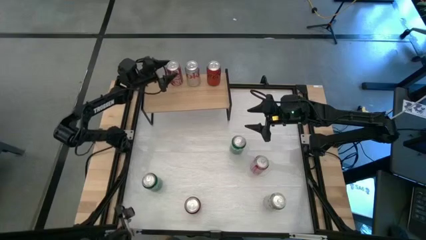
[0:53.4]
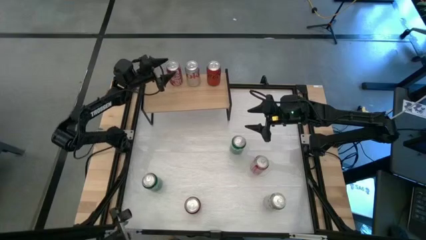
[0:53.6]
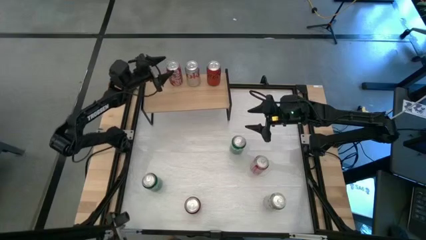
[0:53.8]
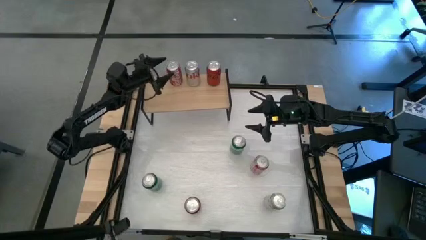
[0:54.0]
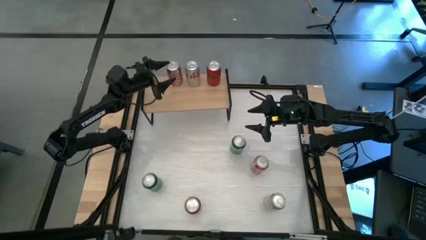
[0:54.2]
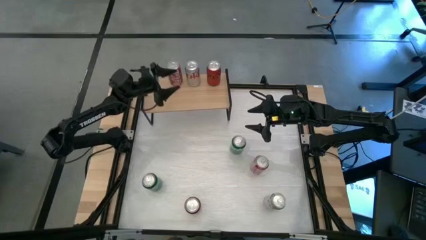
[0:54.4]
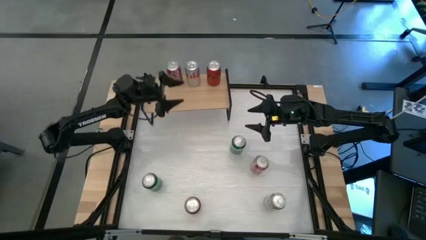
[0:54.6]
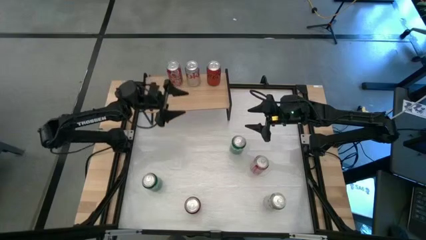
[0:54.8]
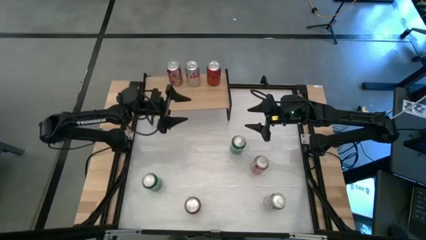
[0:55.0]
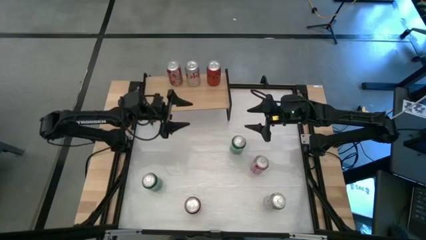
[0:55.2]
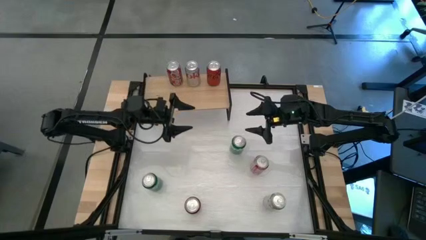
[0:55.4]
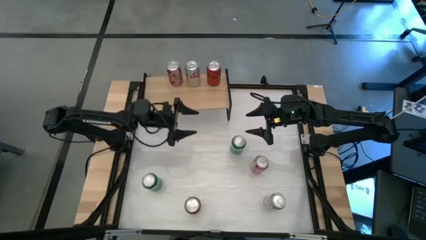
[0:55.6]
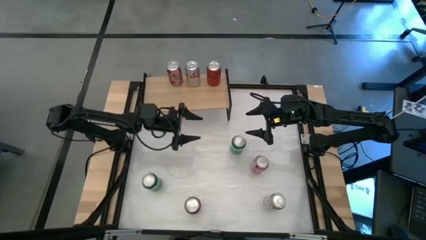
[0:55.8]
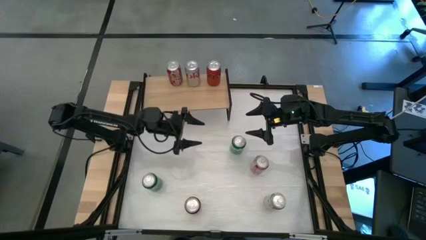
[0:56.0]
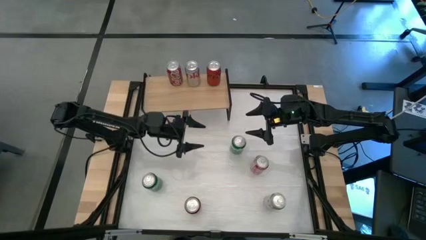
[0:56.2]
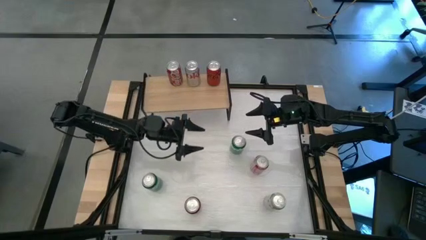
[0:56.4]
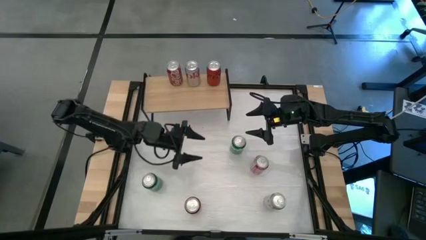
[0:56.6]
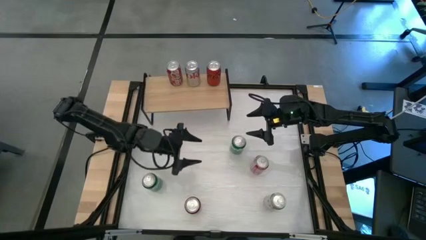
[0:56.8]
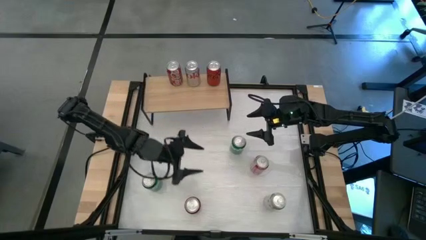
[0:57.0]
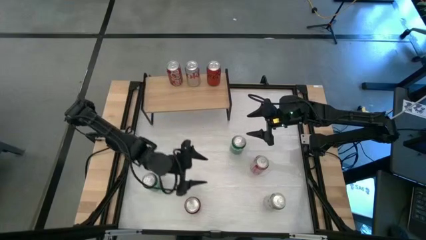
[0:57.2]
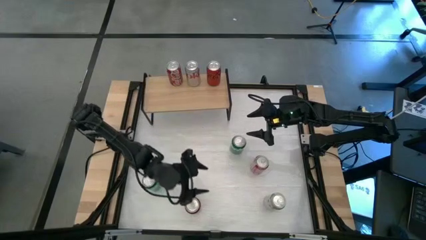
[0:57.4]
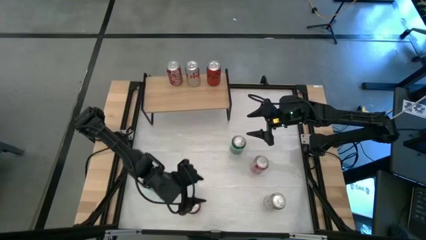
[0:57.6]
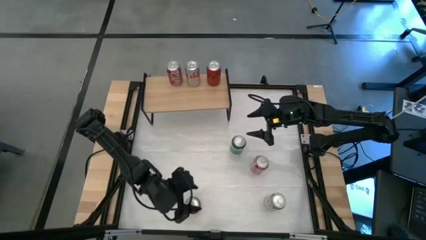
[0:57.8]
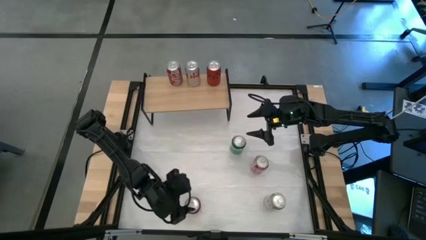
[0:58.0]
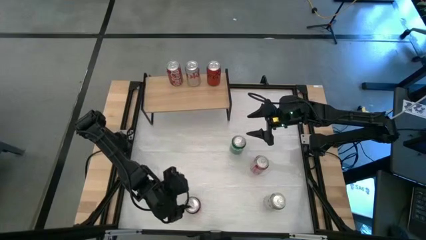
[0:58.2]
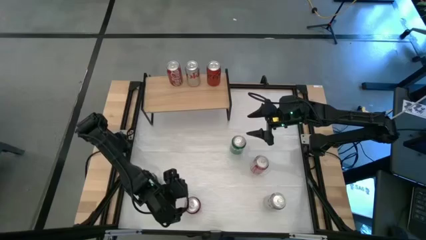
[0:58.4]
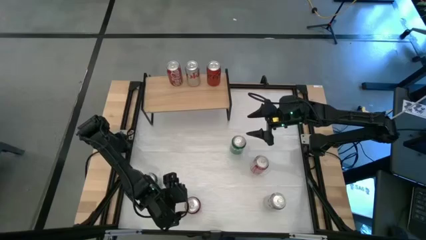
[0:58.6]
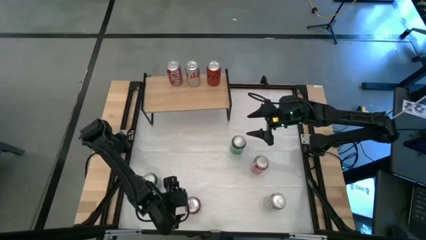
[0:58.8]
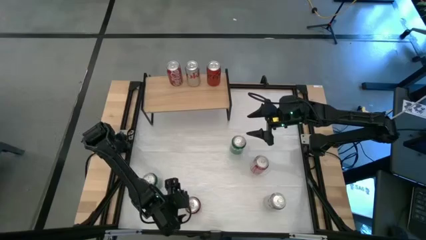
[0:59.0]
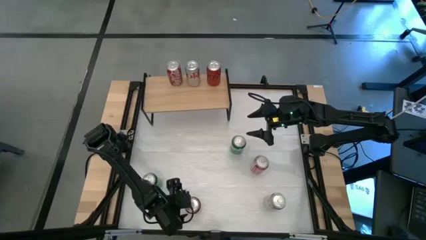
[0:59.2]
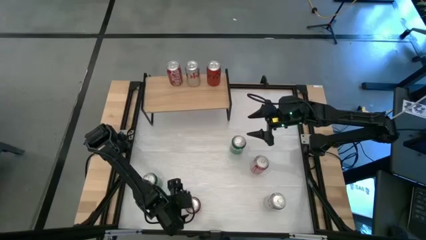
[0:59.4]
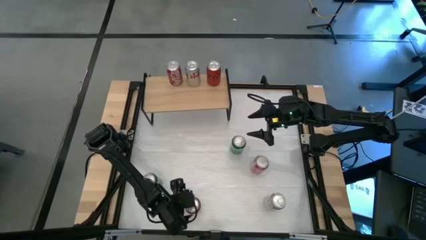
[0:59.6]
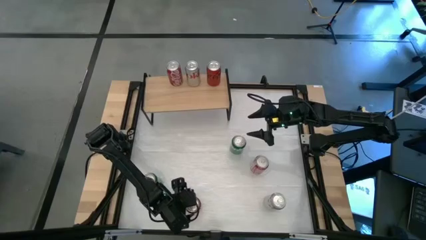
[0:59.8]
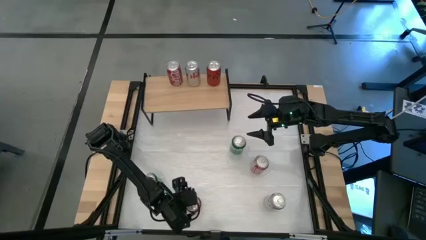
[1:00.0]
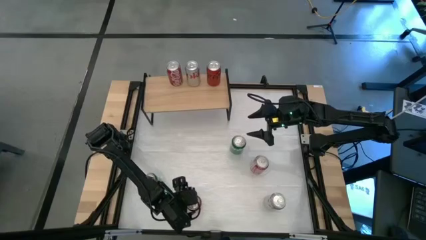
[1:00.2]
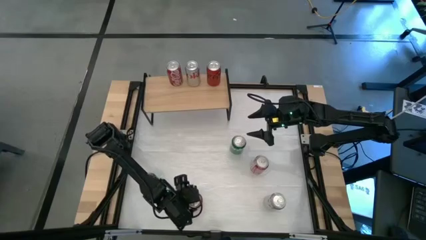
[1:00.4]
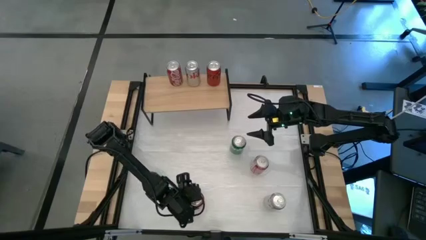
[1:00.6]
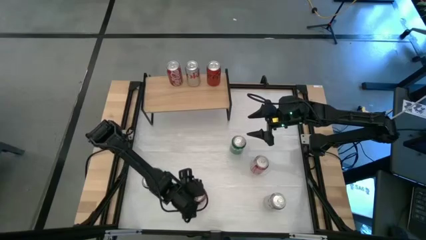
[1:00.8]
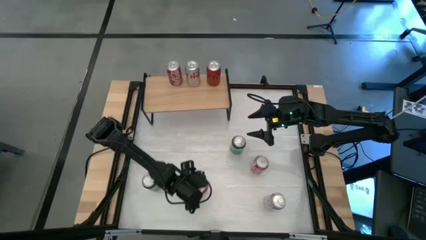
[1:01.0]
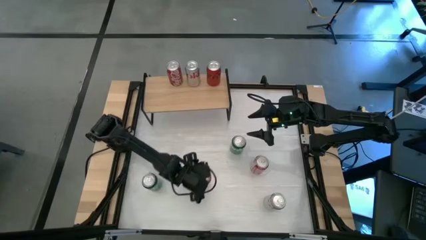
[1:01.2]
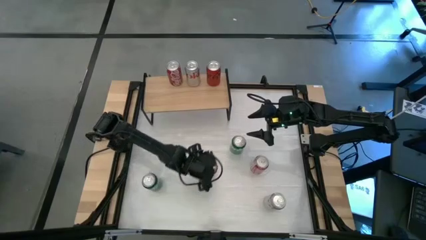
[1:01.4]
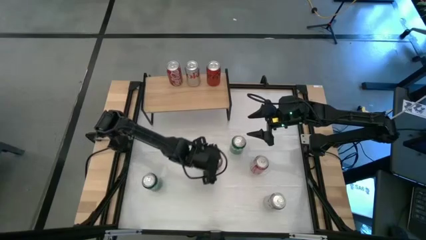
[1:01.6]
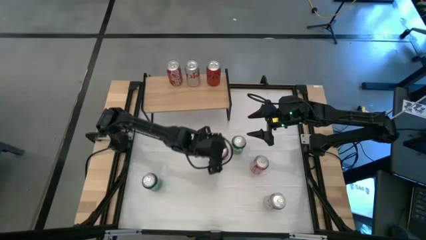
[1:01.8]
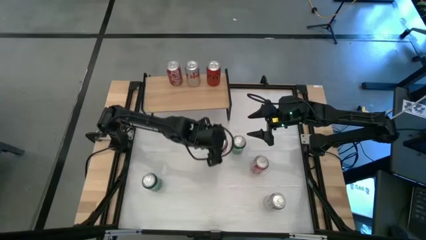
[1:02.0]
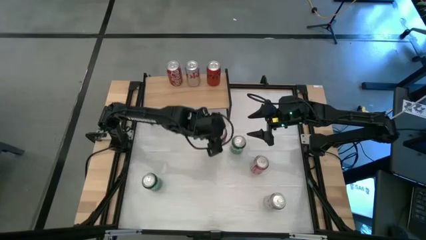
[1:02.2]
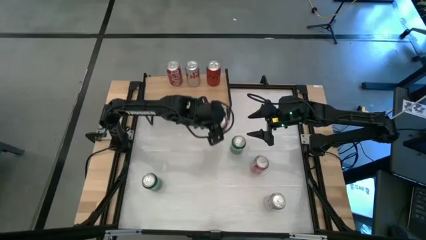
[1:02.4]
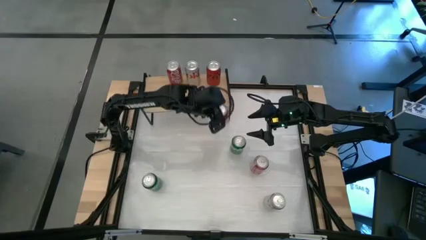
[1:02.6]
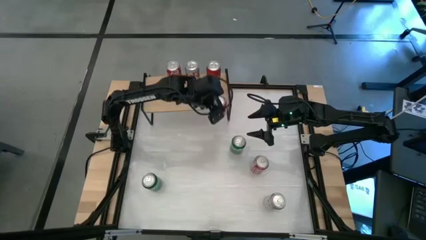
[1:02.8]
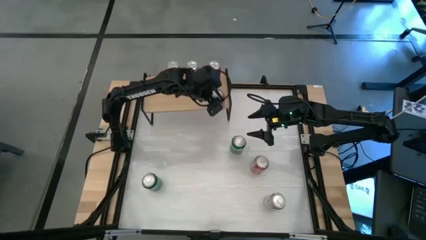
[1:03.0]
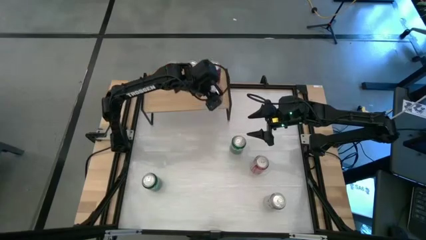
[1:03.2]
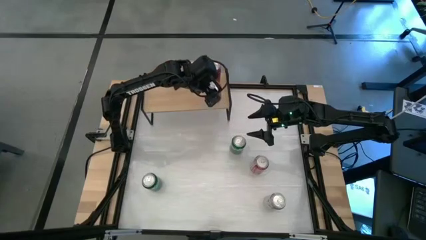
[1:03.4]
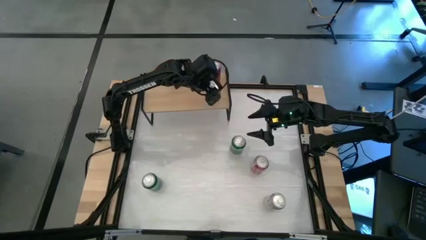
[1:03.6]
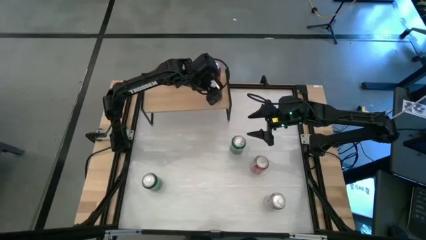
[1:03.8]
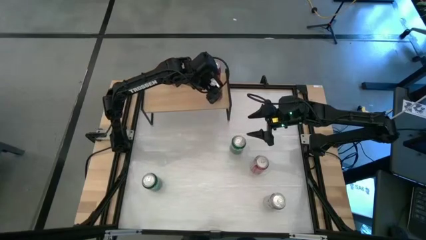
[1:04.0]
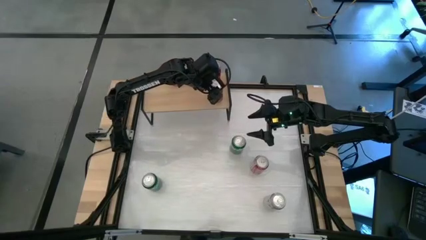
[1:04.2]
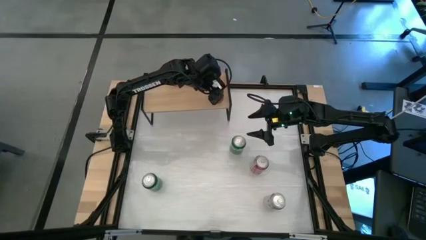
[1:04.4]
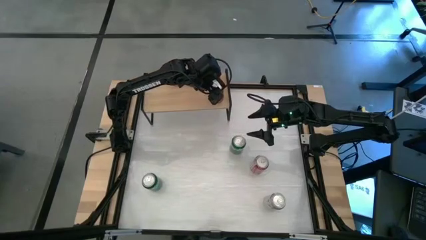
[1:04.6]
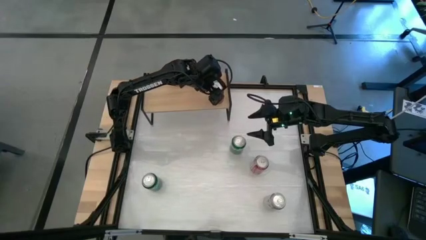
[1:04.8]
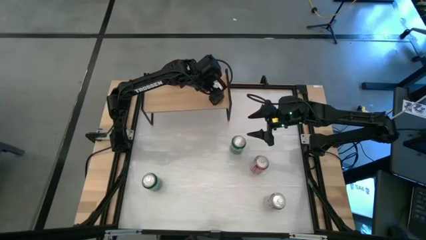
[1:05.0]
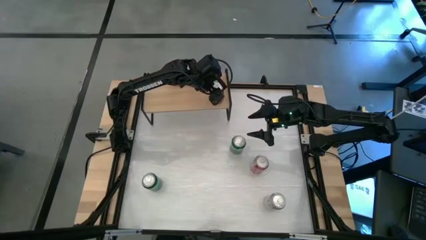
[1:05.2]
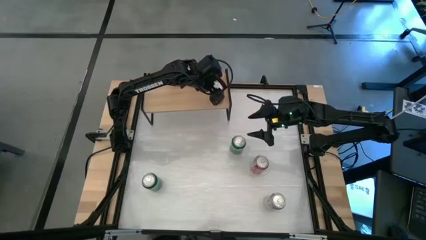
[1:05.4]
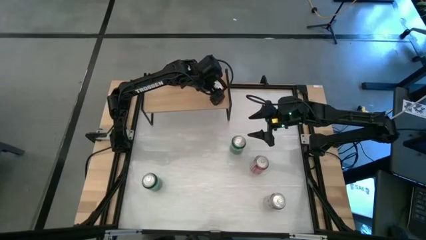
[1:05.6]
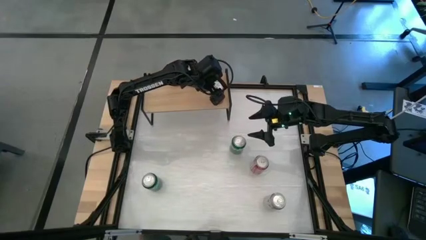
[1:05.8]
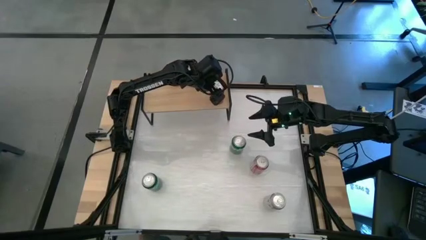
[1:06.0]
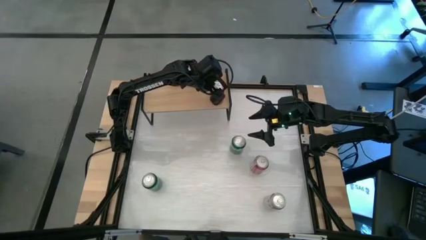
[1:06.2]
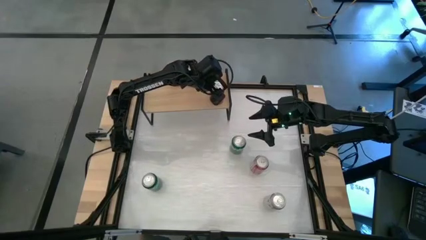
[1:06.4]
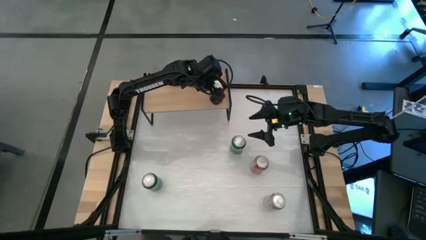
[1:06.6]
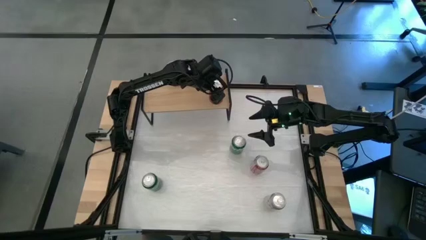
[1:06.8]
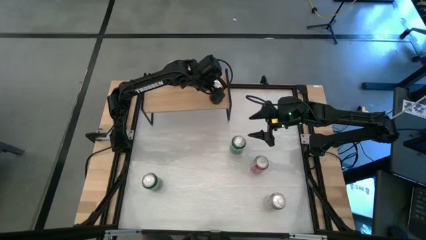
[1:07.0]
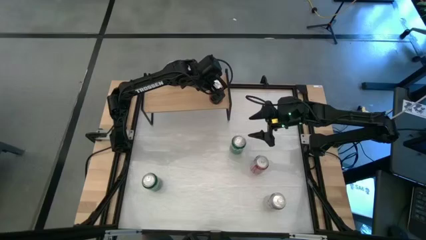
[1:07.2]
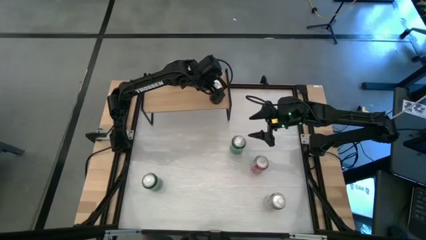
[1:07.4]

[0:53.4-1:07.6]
Task: Place canned beverage on shelf
Put the red black soda can on the shelf aligned with the other red black soda can
